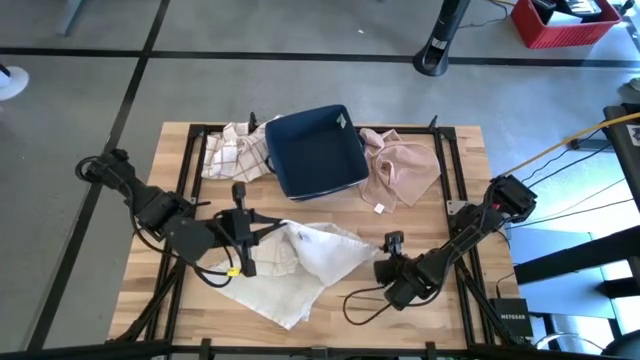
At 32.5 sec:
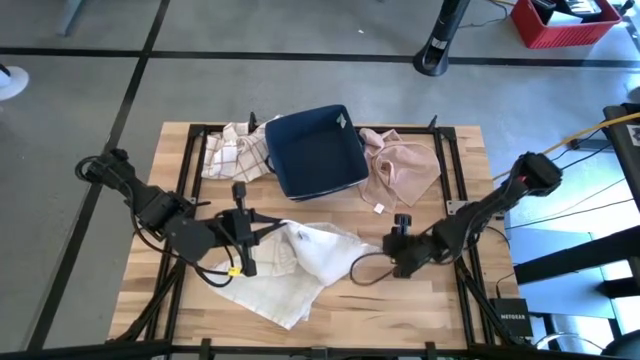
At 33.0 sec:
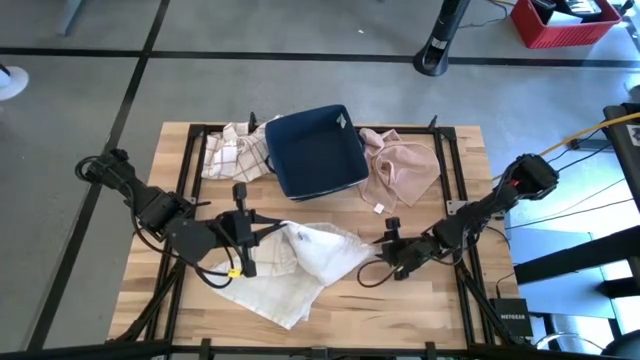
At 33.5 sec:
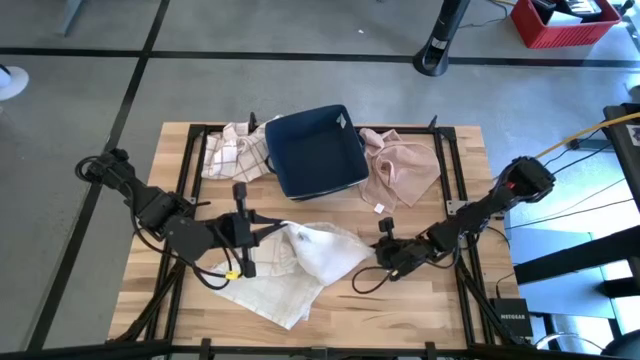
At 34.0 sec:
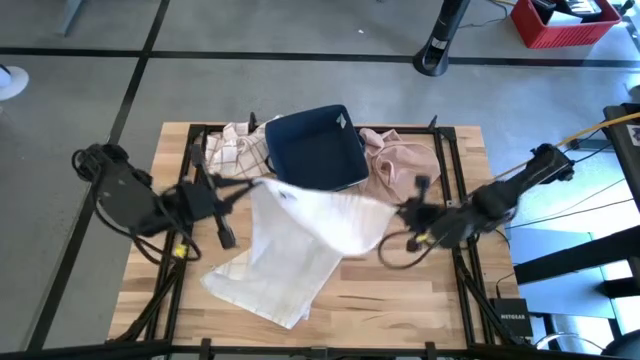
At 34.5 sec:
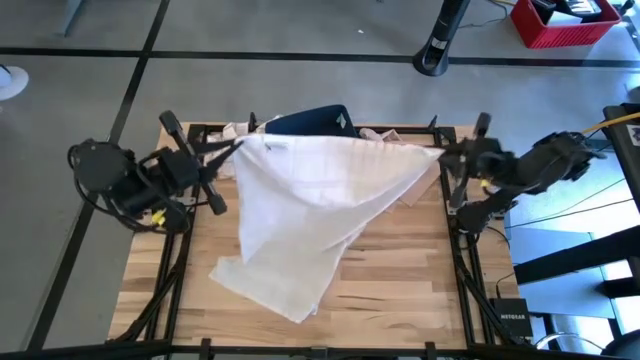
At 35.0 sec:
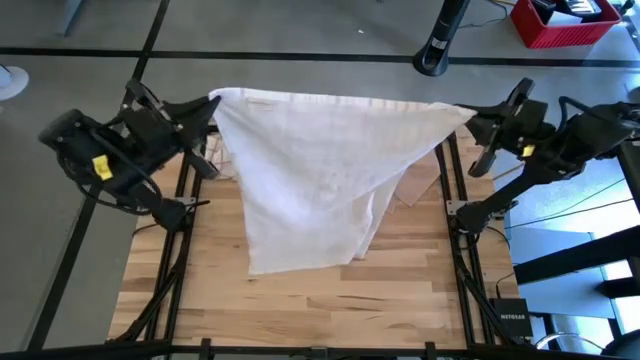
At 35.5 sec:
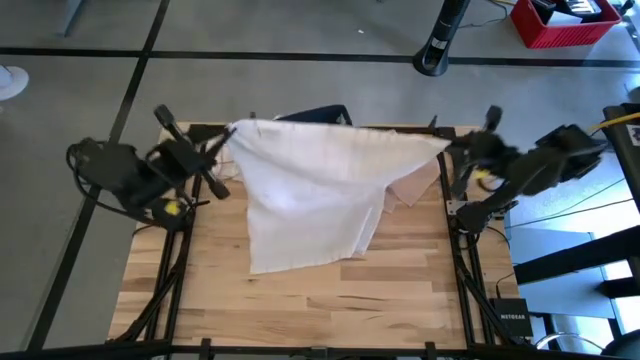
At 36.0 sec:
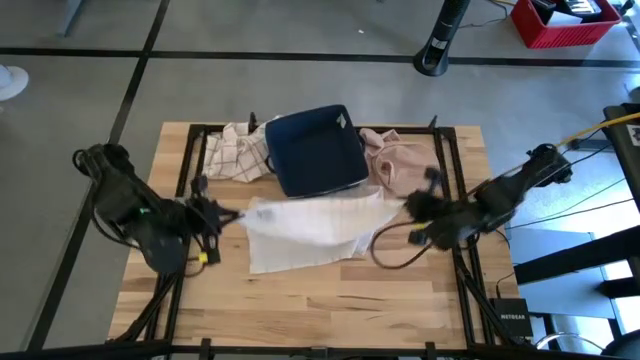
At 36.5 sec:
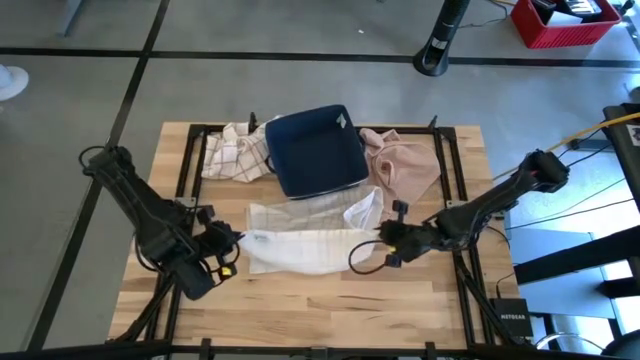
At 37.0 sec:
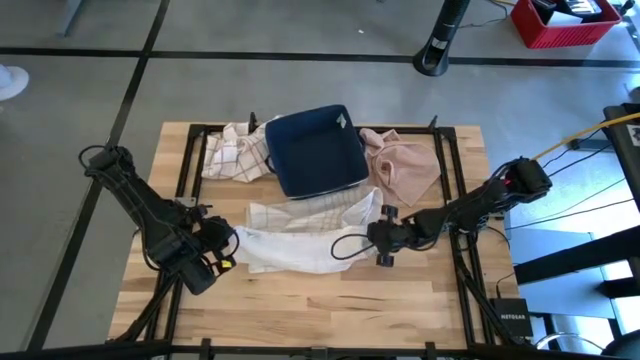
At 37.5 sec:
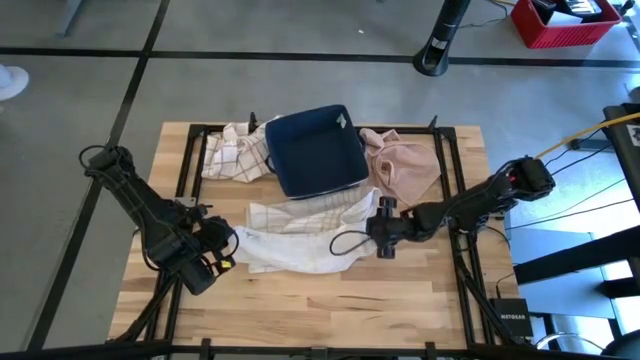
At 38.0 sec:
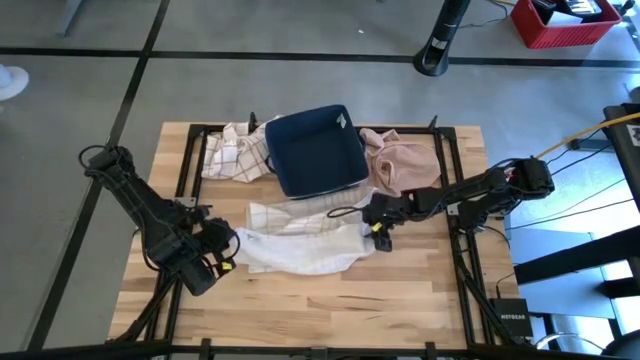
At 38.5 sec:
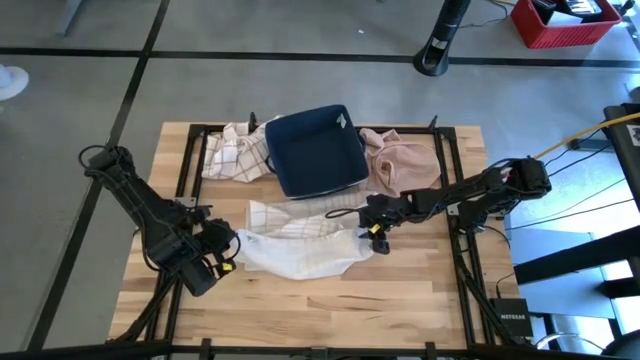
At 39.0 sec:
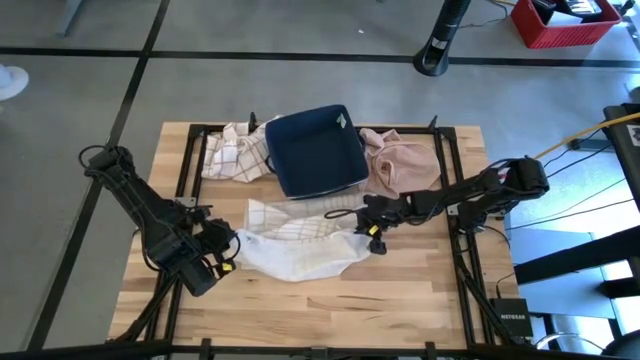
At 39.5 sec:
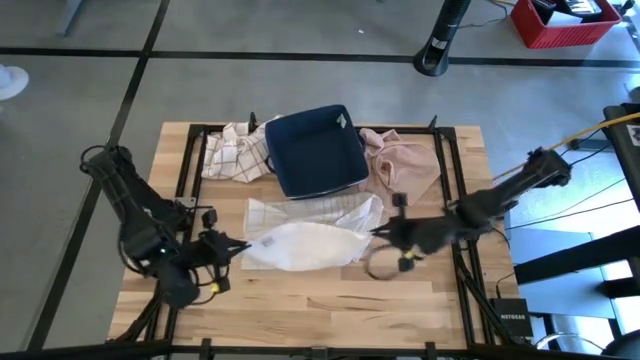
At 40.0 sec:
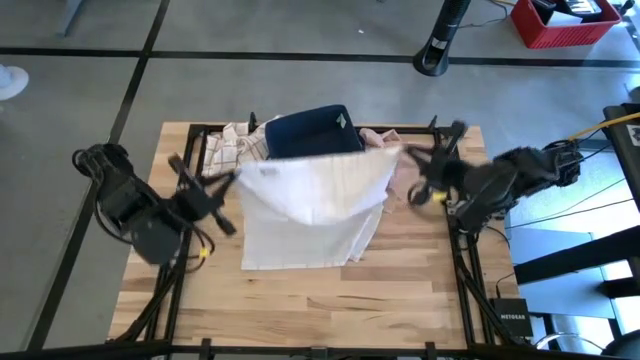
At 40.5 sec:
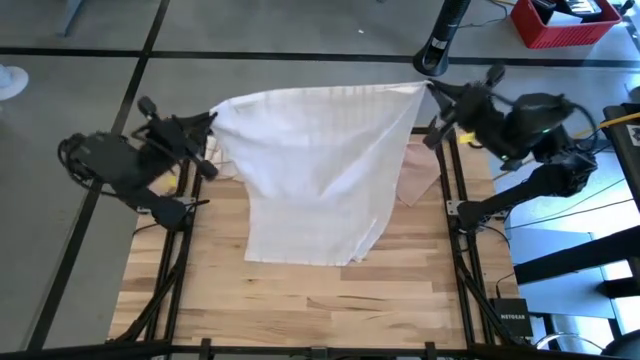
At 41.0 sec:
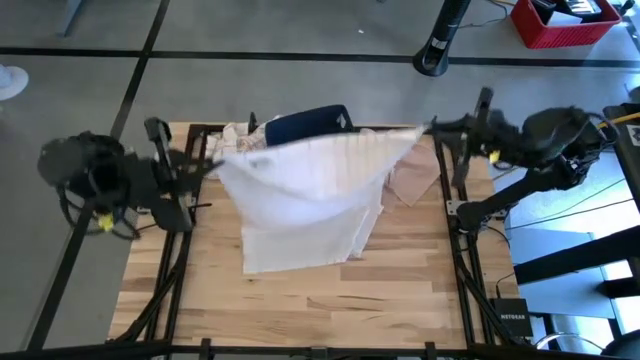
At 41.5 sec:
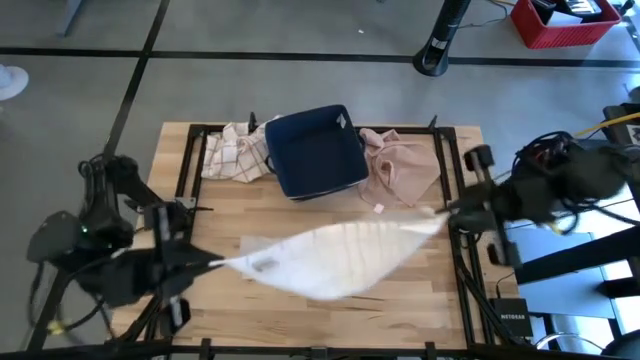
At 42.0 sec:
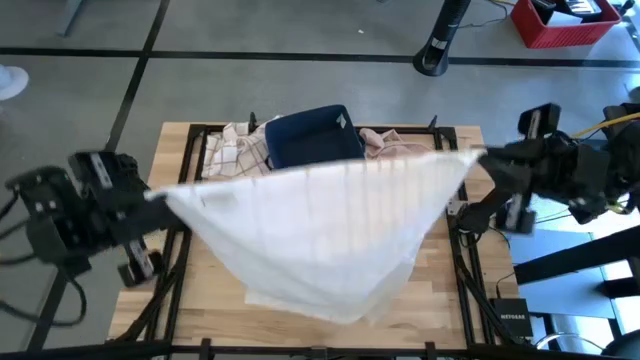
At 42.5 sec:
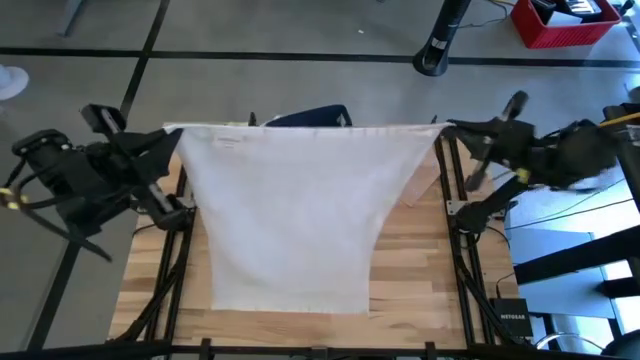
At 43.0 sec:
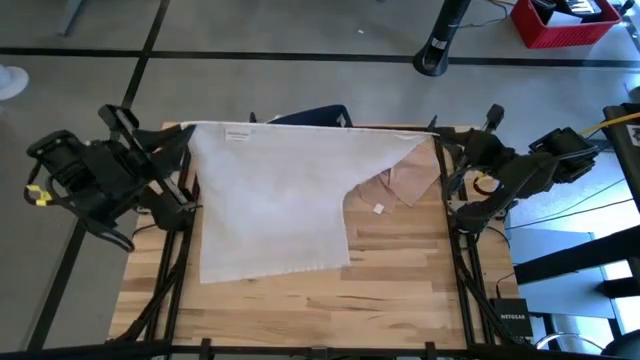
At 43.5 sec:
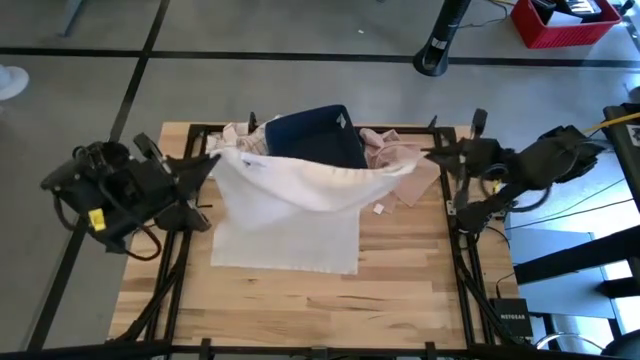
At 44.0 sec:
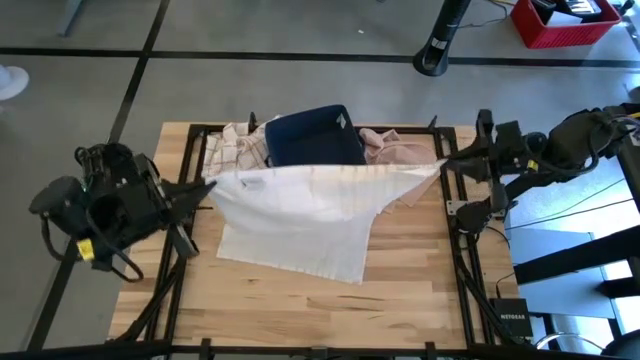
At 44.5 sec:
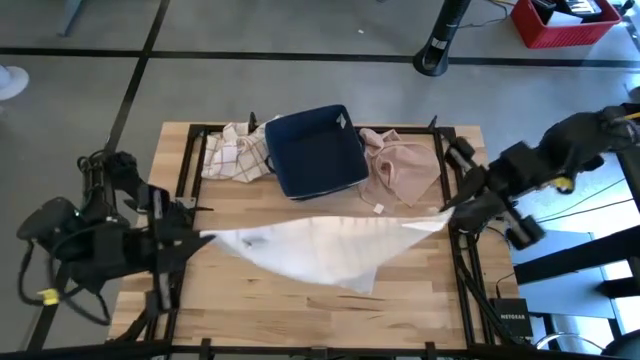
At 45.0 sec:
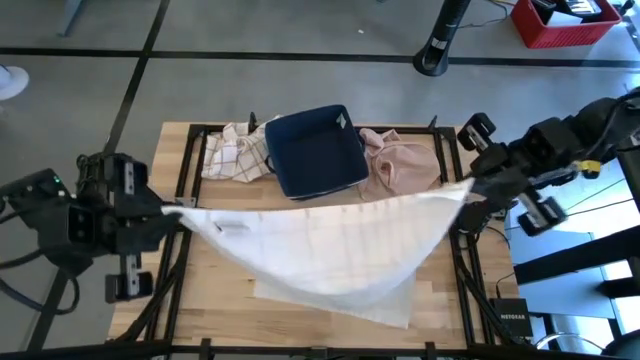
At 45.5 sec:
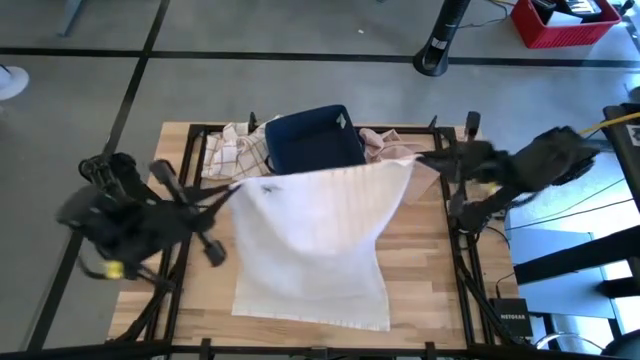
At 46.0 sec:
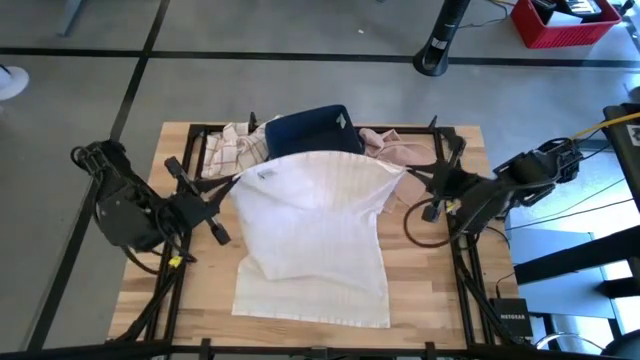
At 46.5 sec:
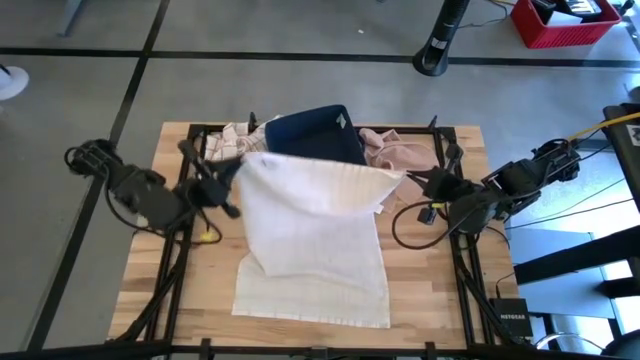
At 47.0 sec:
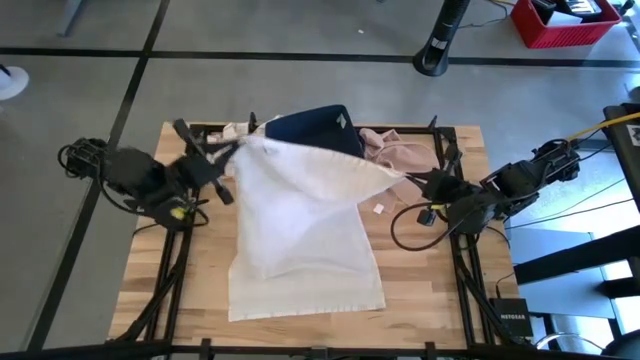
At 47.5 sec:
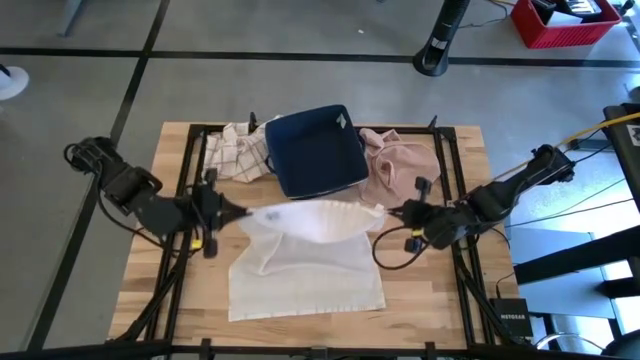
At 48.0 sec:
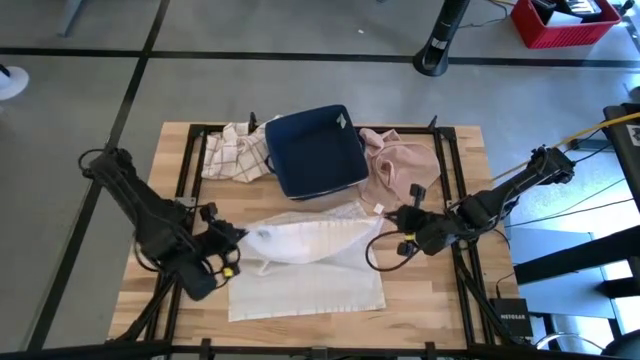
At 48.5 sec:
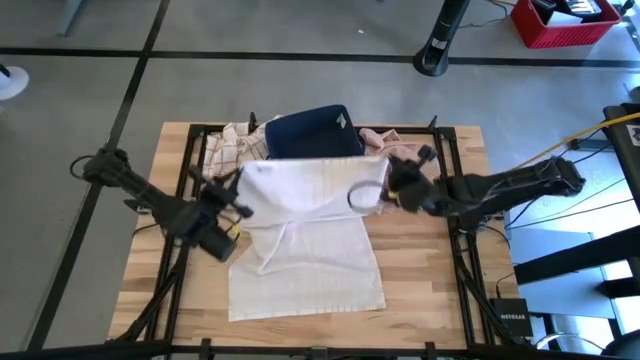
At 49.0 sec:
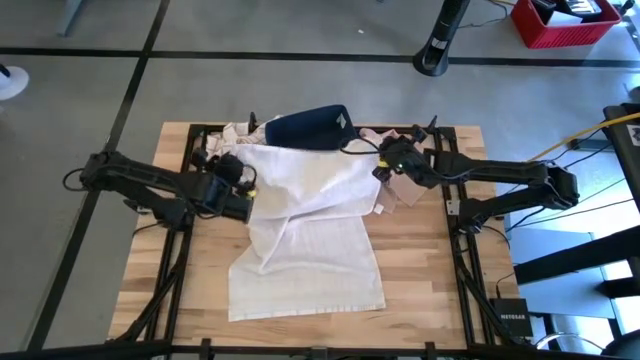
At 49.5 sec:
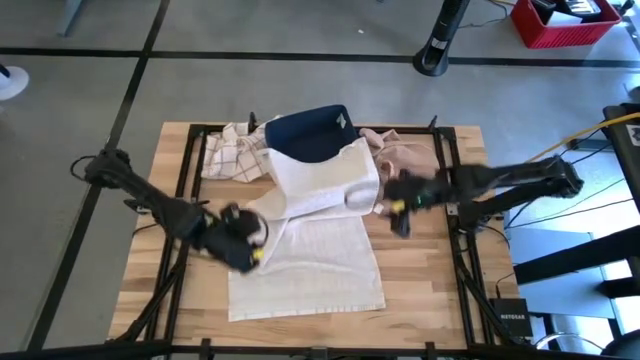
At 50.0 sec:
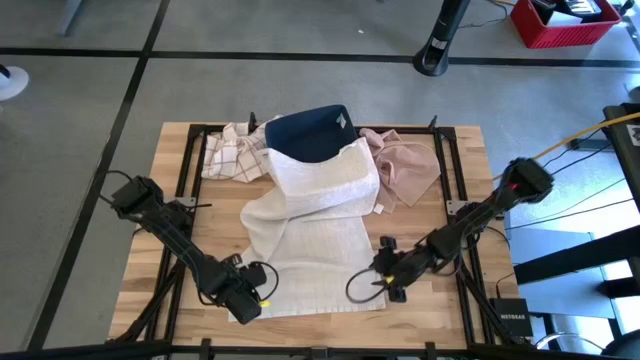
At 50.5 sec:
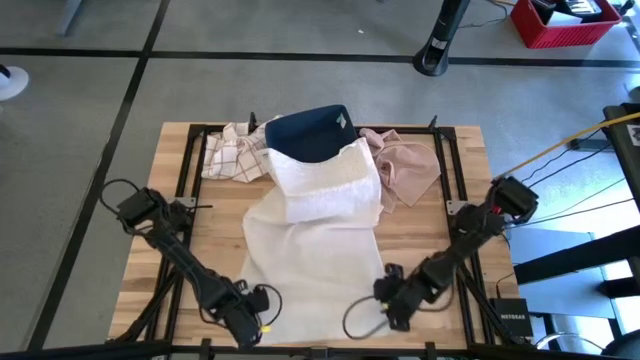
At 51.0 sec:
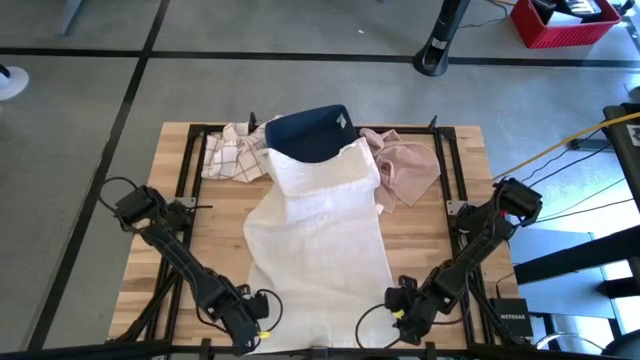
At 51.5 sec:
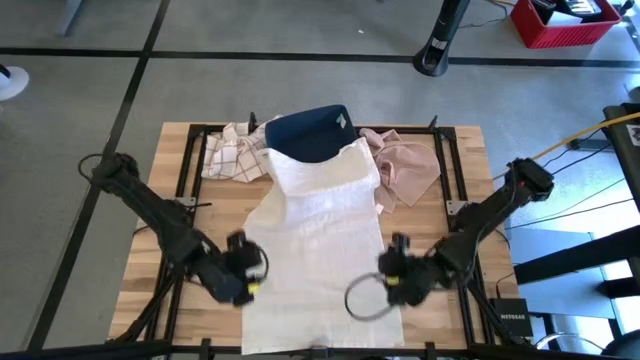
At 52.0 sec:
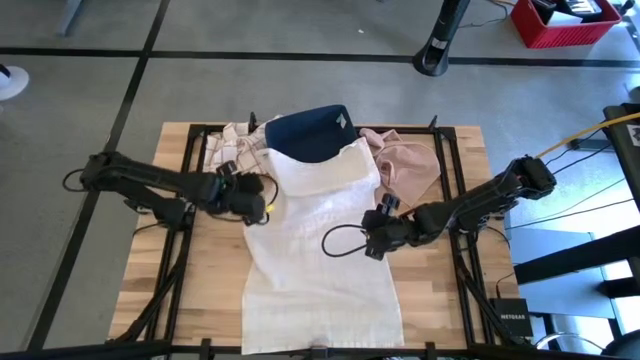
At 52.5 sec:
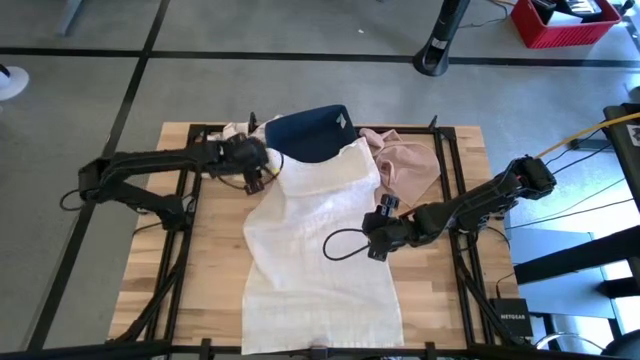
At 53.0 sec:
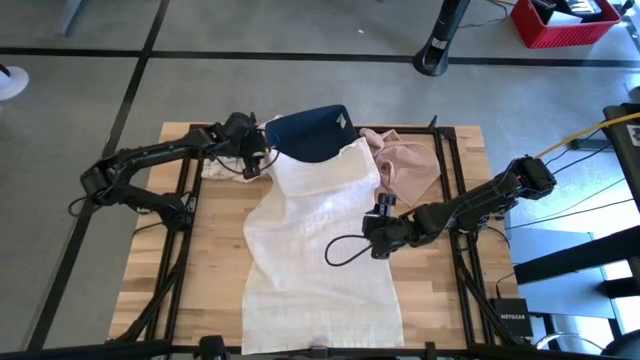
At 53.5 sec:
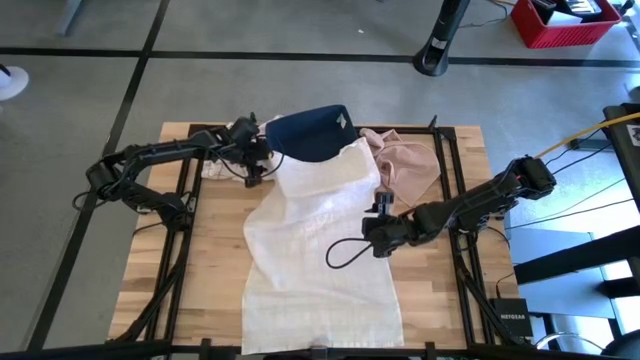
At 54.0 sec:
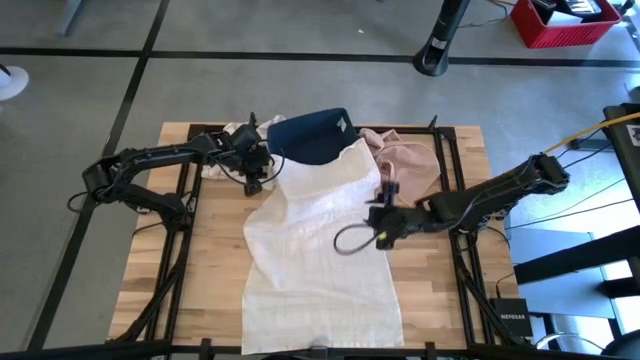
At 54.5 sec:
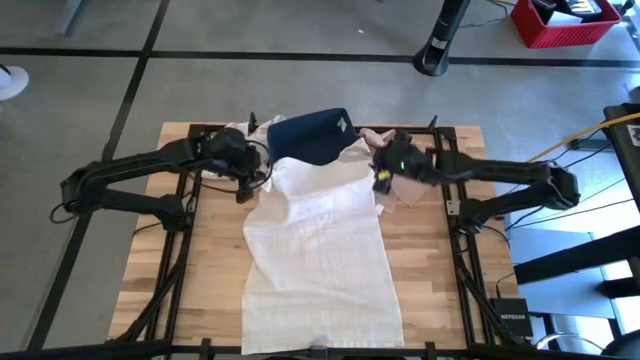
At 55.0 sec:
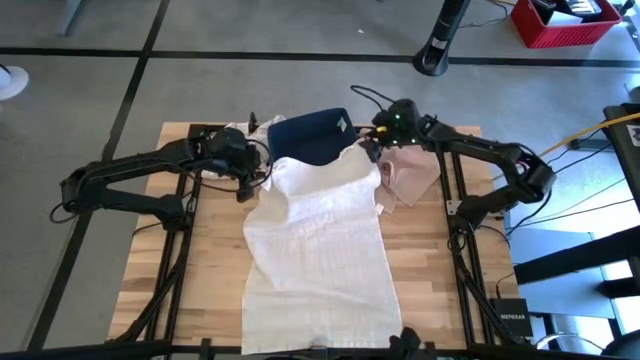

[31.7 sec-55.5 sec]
Task: Fold towel
Fold the white with gray pattern towel on the table
